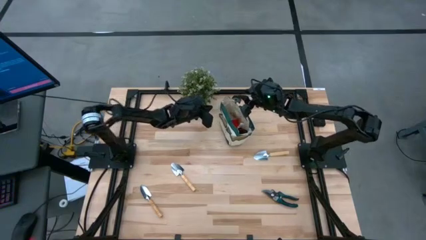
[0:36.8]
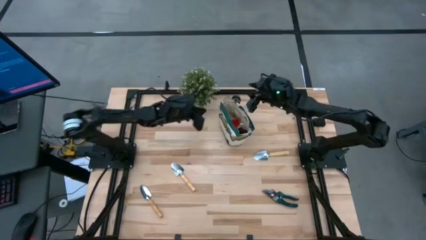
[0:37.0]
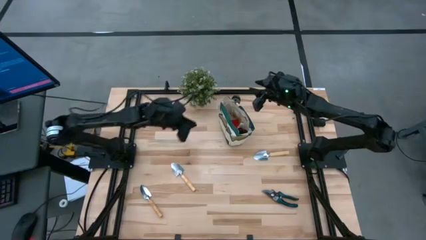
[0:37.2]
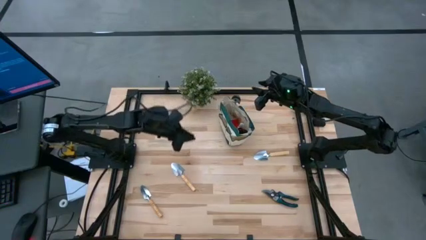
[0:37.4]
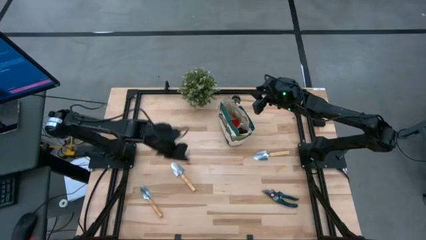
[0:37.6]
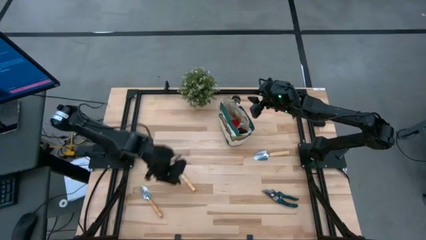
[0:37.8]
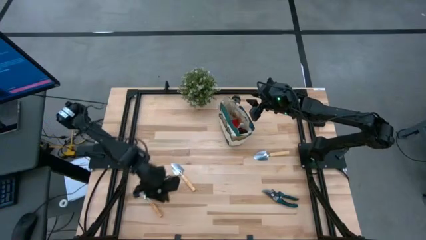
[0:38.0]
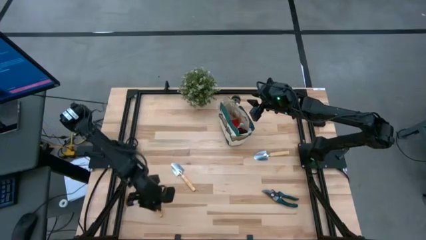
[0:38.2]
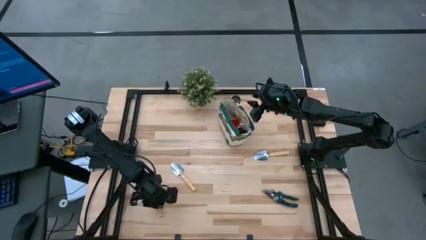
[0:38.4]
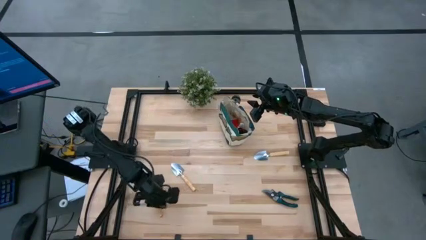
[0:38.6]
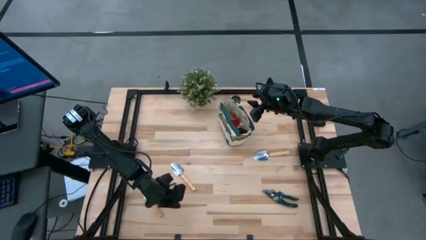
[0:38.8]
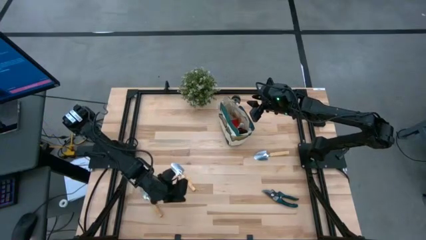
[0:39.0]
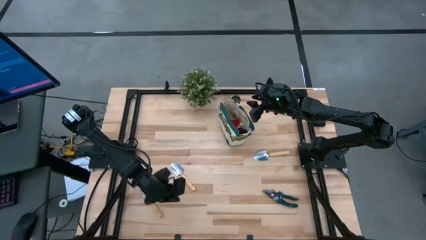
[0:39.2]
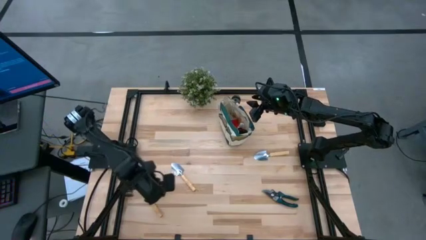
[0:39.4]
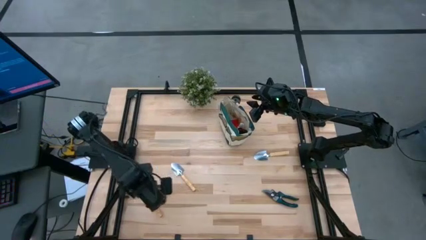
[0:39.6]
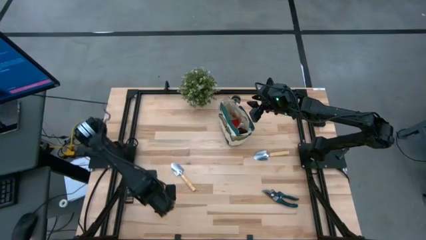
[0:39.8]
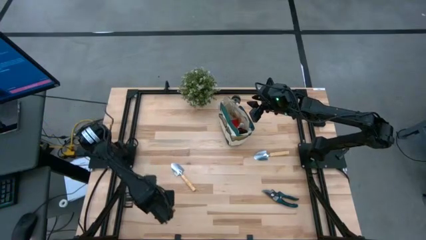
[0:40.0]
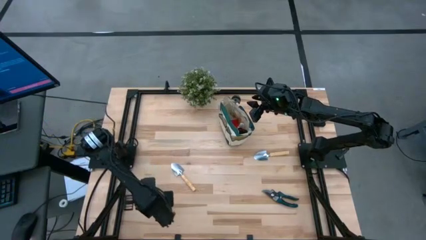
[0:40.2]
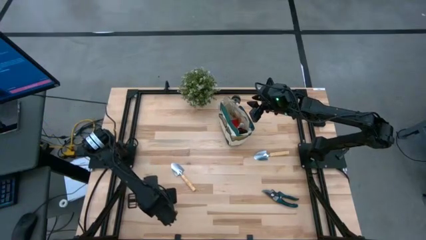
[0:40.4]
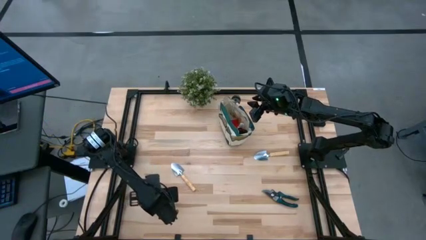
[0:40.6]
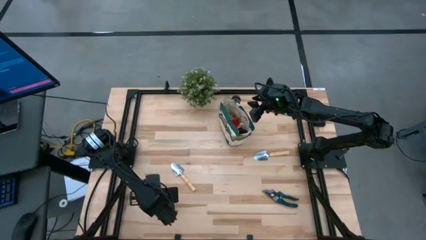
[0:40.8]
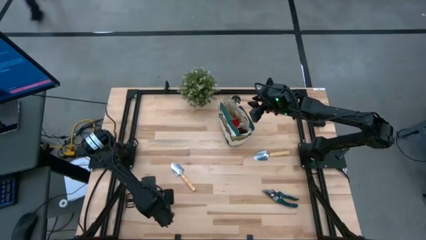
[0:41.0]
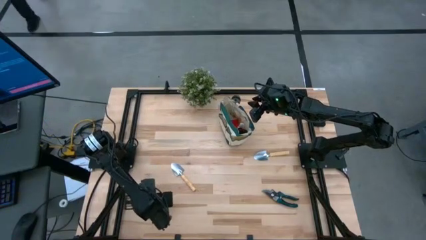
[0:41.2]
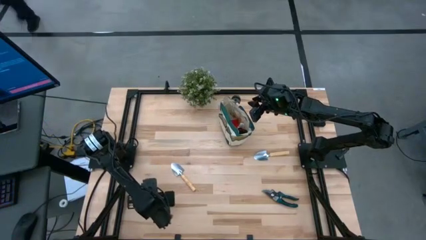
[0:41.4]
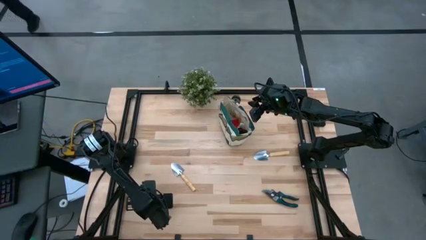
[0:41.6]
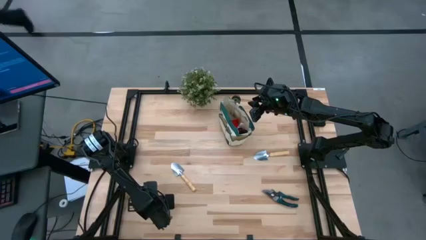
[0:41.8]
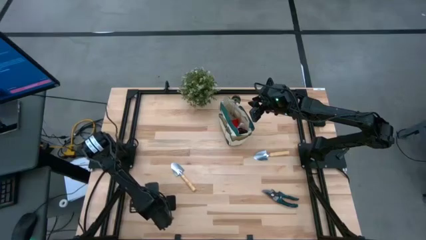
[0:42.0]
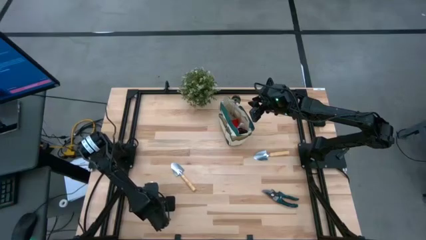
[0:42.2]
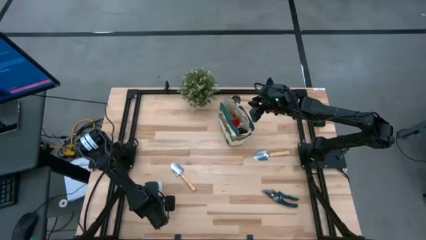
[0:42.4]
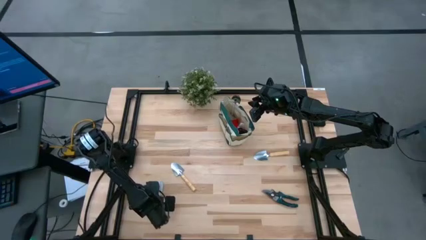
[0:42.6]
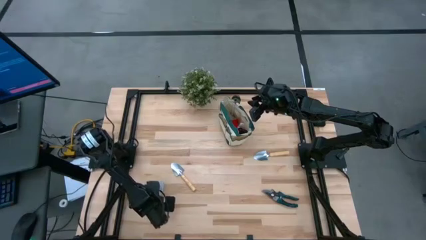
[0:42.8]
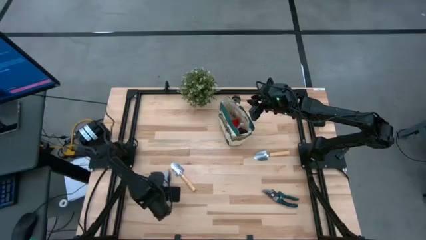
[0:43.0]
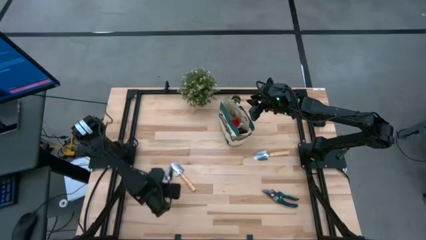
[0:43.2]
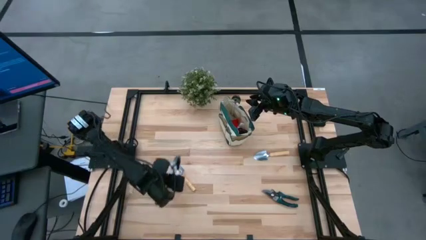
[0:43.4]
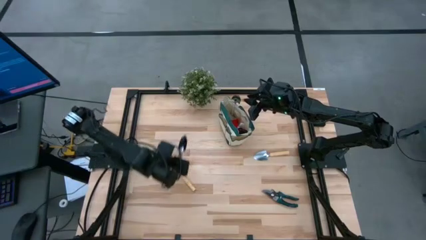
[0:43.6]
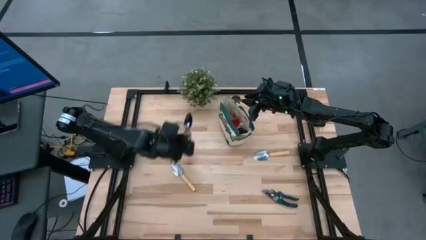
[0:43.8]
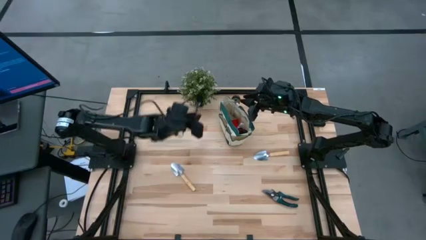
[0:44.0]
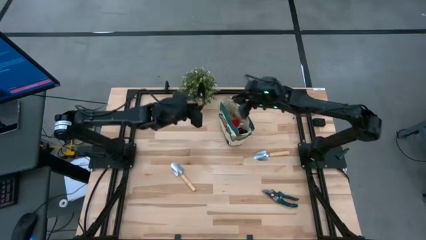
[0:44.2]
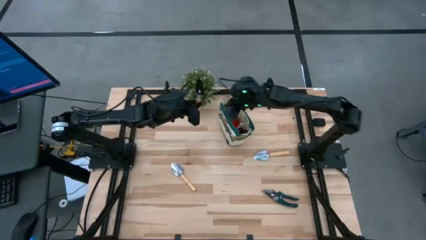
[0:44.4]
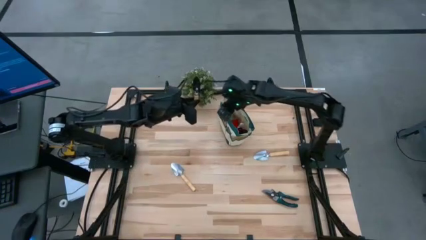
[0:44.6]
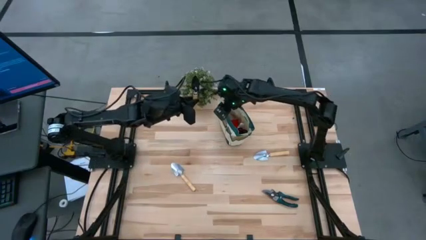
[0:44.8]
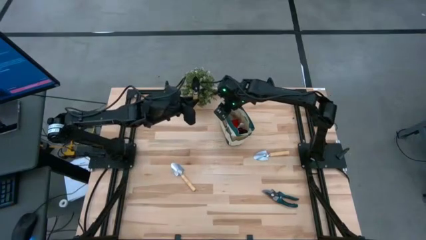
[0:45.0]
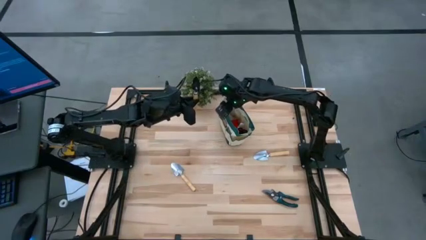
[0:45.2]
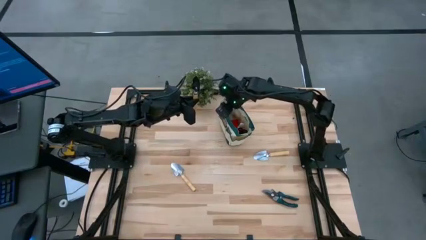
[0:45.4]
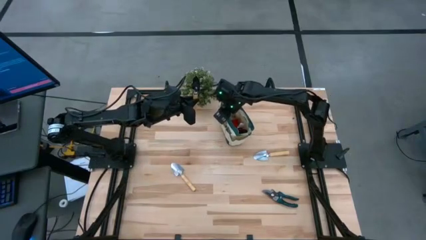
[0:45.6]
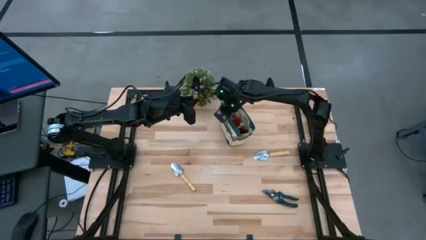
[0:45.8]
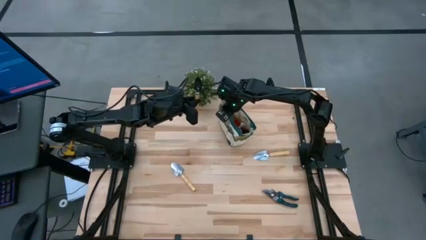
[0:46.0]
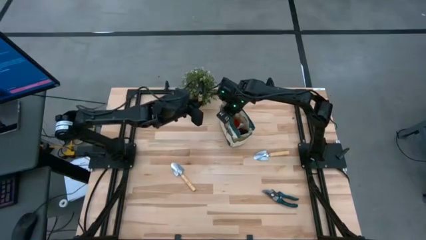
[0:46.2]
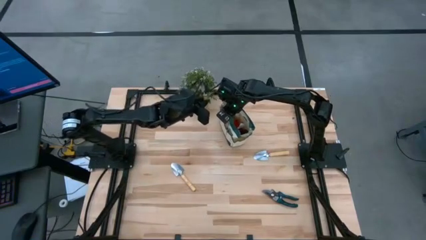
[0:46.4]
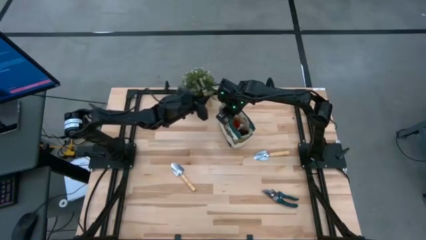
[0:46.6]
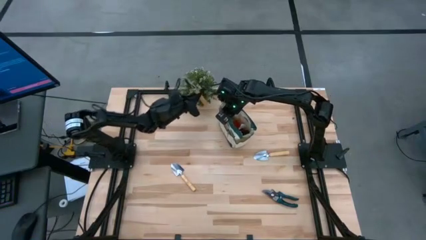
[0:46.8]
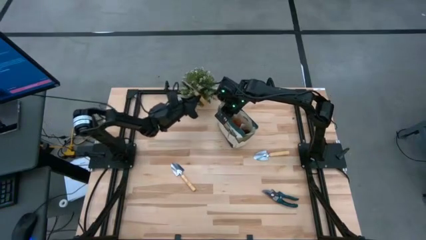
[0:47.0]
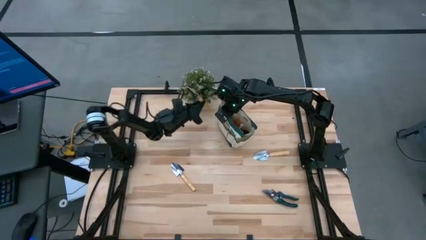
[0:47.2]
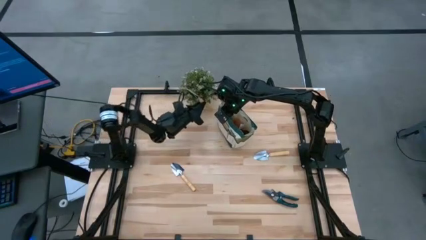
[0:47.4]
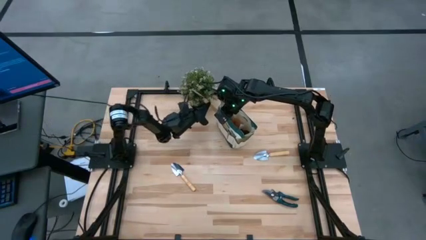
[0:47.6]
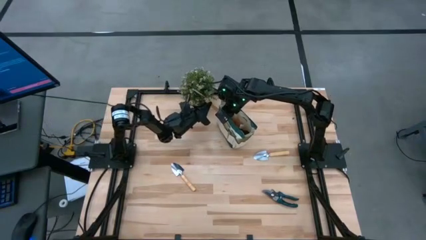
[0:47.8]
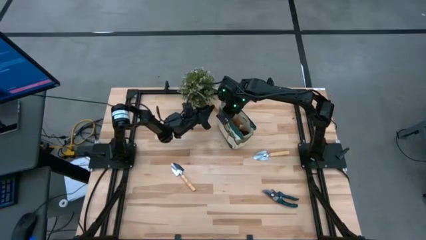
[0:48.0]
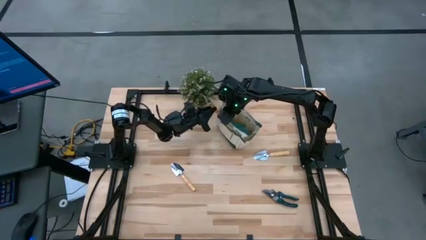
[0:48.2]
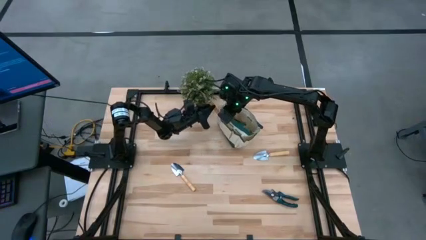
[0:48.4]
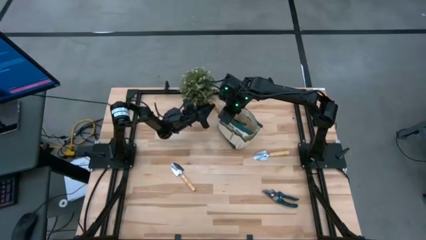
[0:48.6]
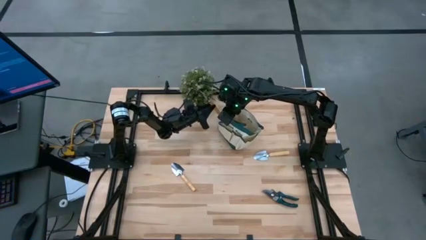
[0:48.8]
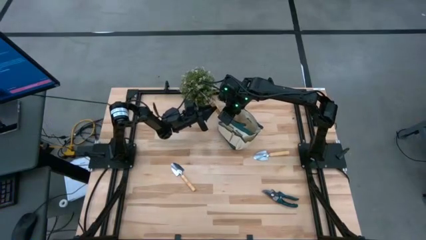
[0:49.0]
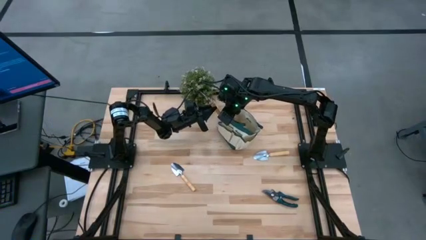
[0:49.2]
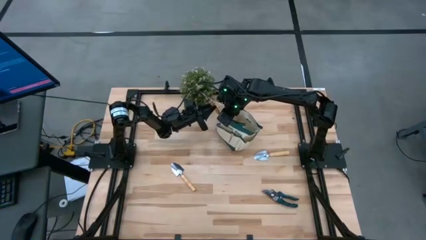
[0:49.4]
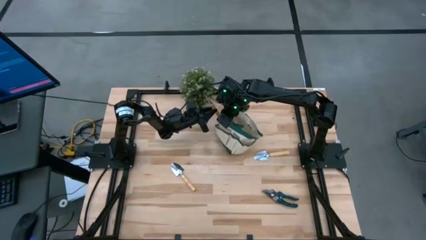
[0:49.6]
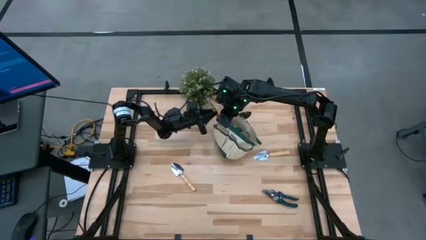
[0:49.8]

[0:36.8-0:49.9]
Task: Pick & Place Garden tools in Gardening bag
Put the brown trowel into the white gardening bag

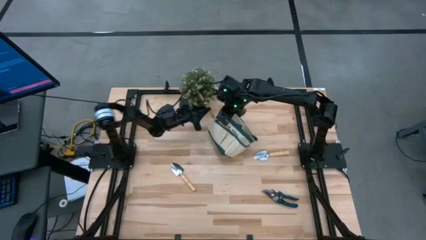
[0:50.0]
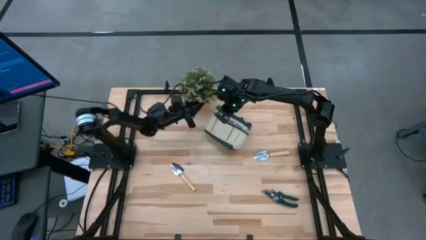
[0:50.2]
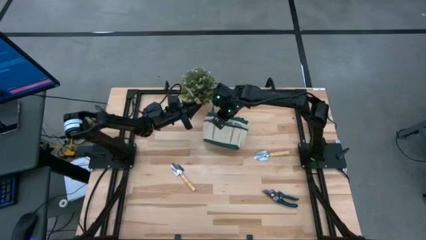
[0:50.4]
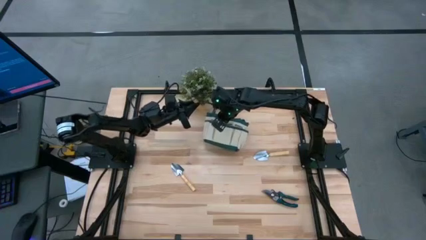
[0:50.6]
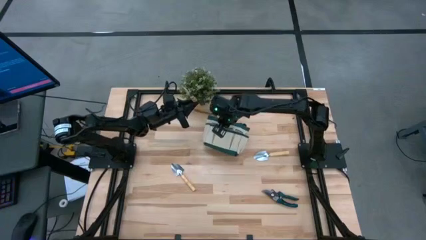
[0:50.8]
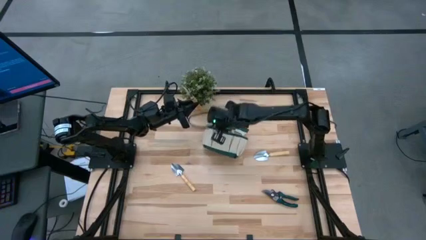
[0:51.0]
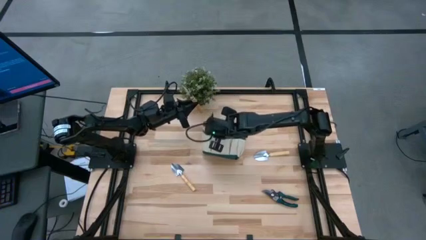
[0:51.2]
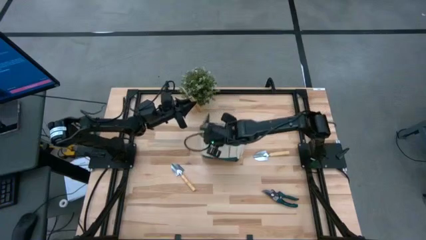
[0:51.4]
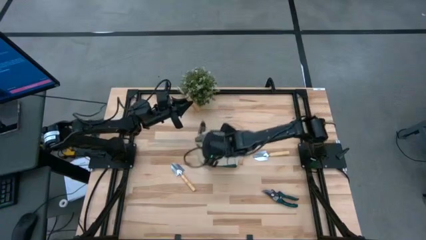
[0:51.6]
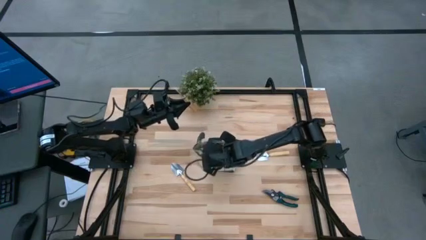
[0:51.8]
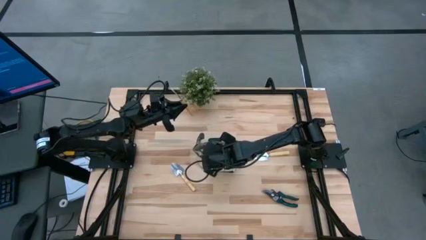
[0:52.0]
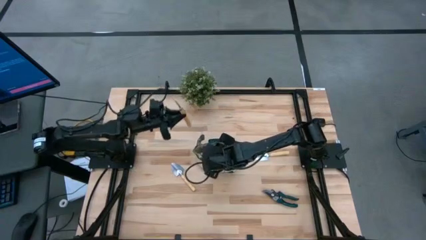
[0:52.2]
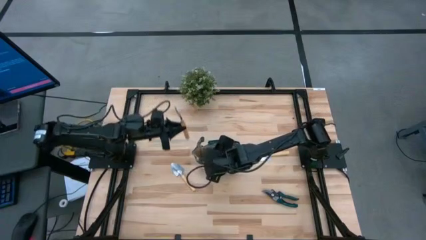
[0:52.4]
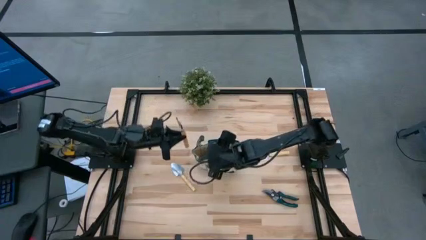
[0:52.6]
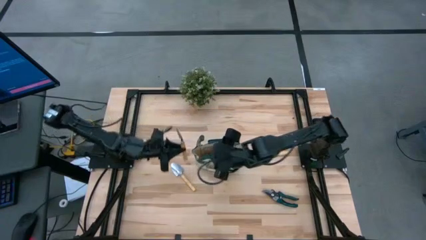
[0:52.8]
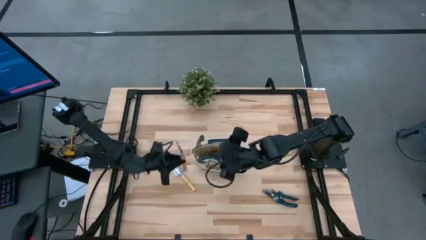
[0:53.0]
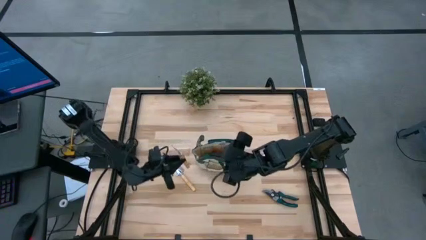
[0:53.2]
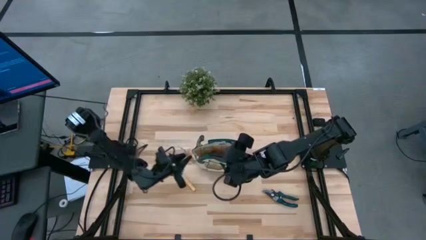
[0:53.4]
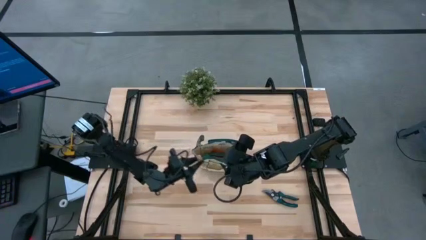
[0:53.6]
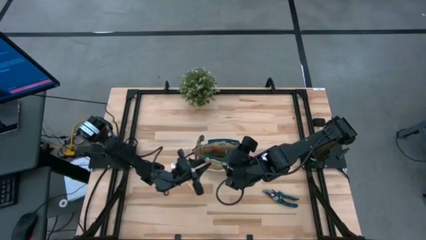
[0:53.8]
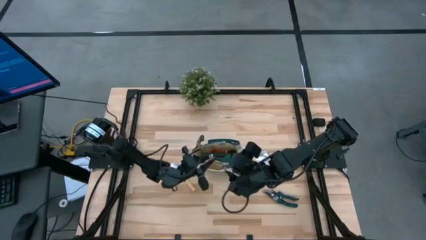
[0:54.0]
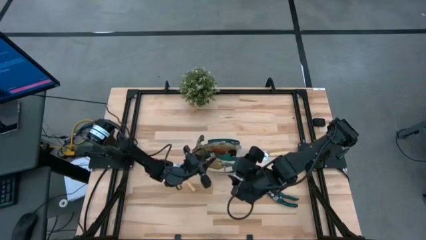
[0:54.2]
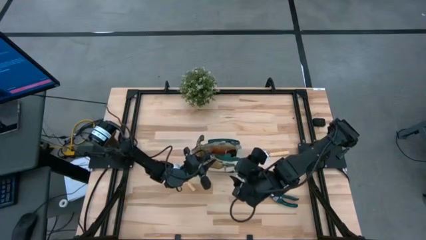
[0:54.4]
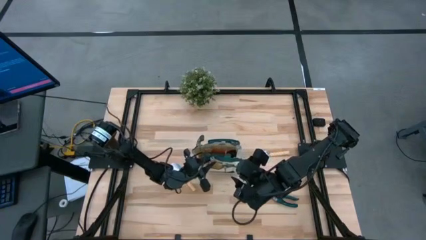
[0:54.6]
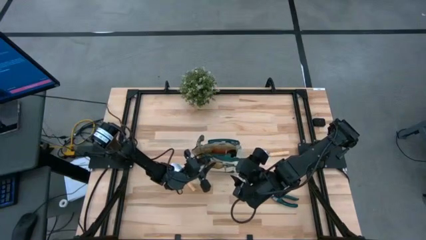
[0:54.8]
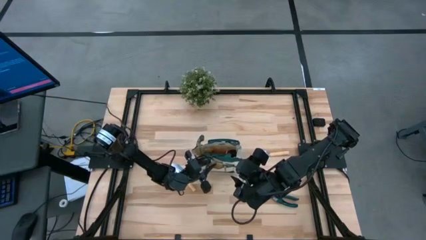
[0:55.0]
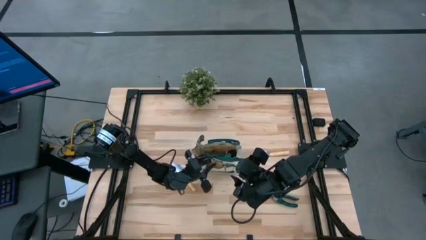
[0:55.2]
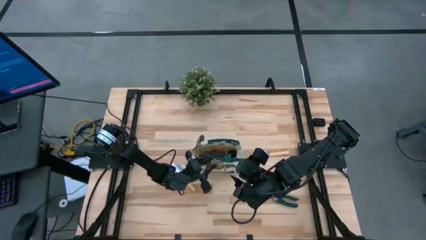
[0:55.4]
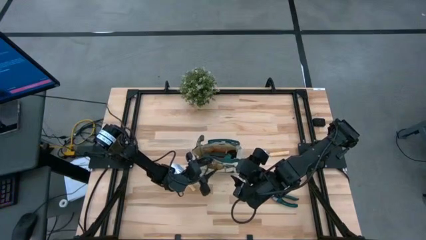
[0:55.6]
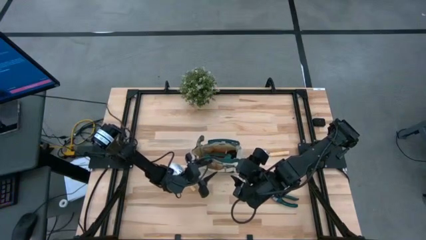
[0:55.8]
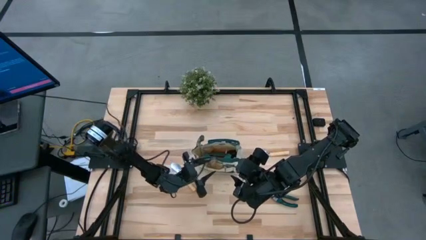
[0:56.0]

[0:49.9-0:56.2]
Put the brown trowel into the white gardening bag
